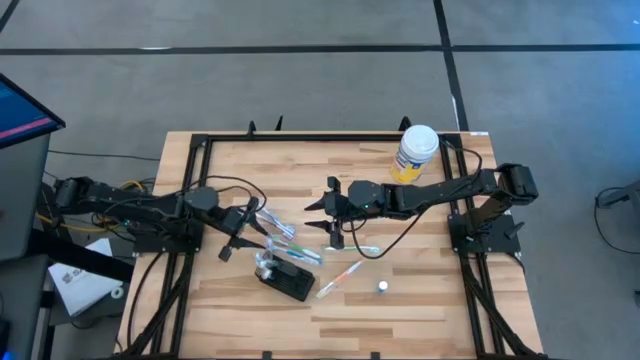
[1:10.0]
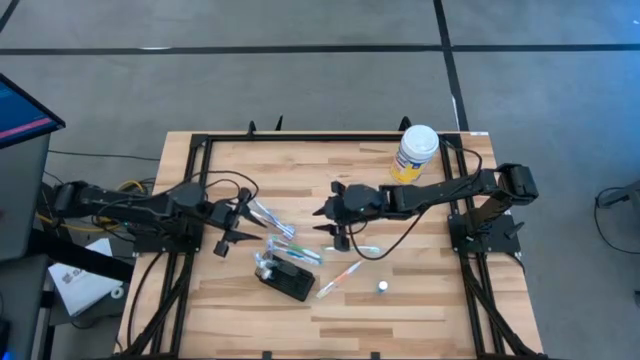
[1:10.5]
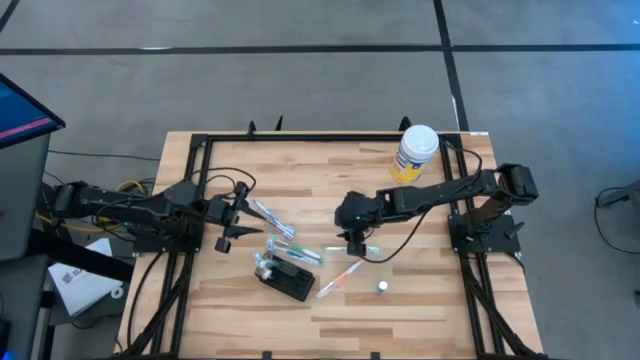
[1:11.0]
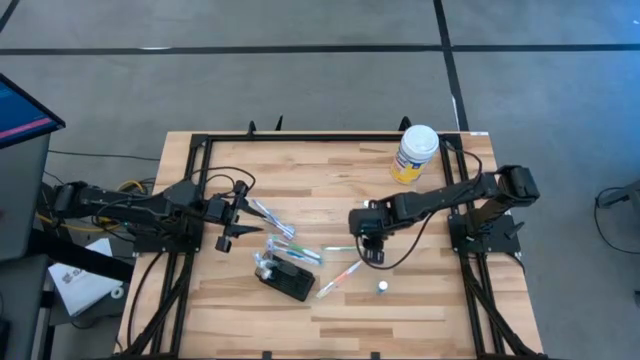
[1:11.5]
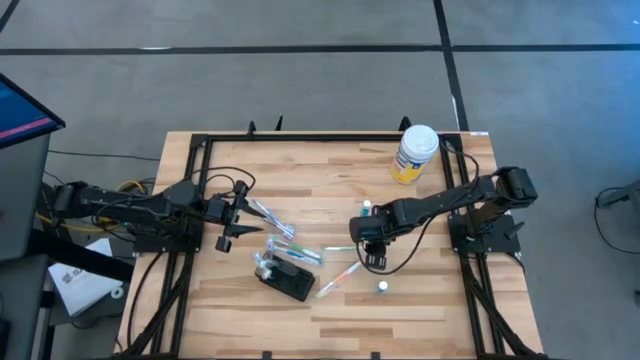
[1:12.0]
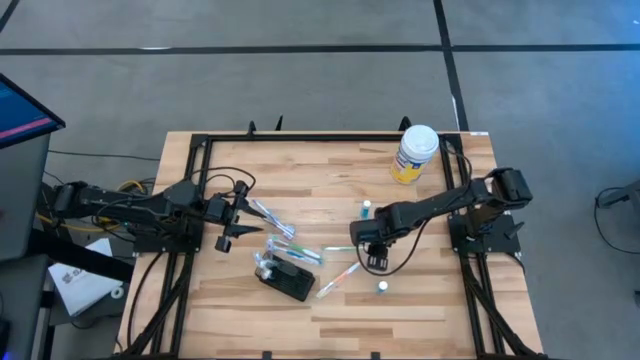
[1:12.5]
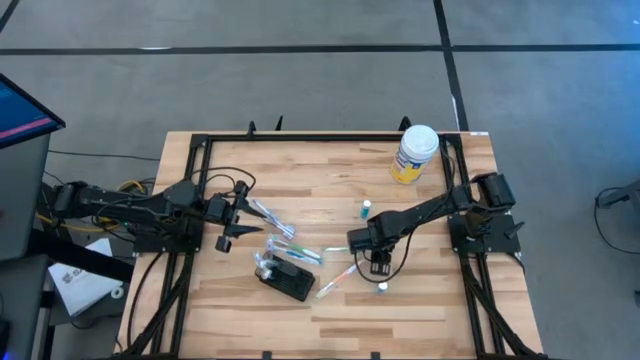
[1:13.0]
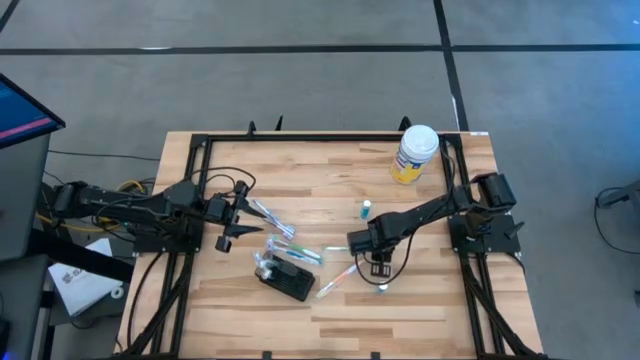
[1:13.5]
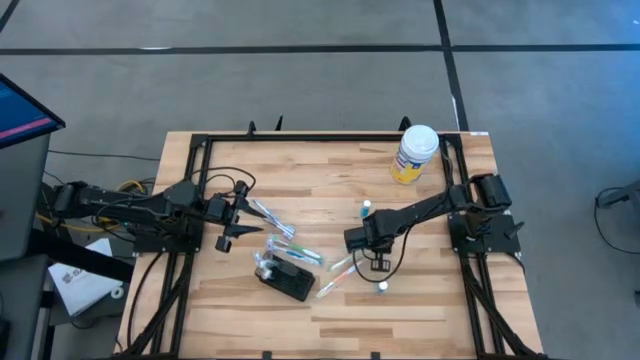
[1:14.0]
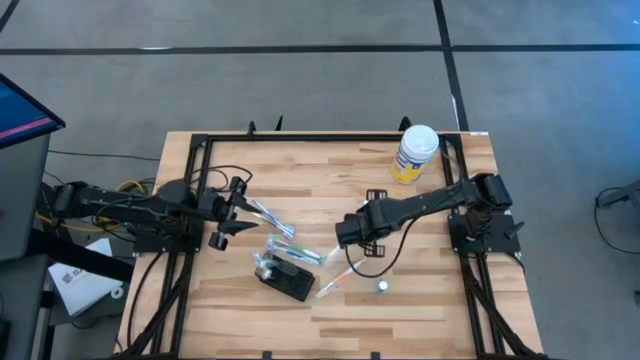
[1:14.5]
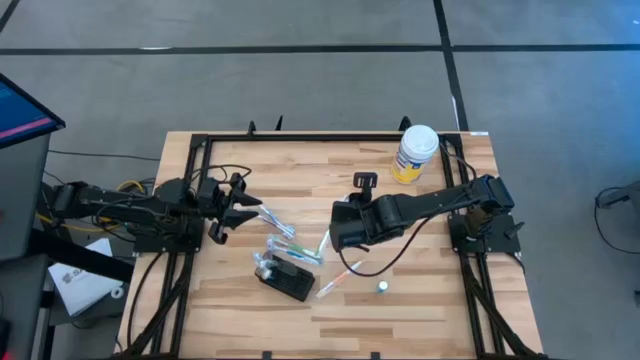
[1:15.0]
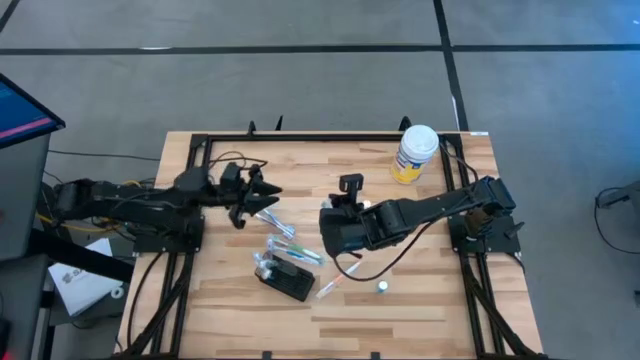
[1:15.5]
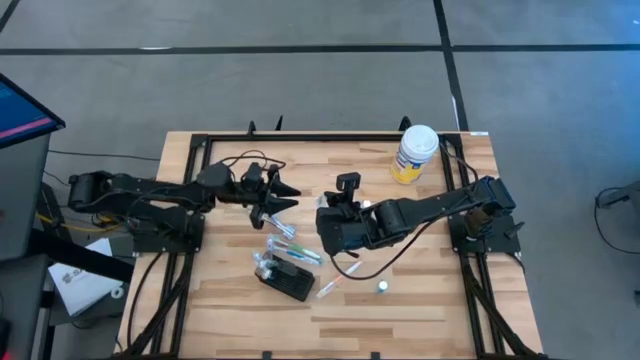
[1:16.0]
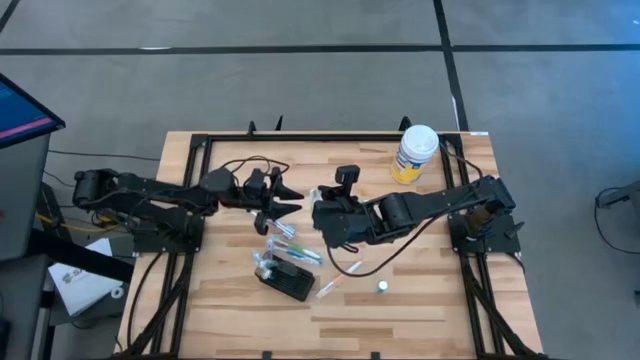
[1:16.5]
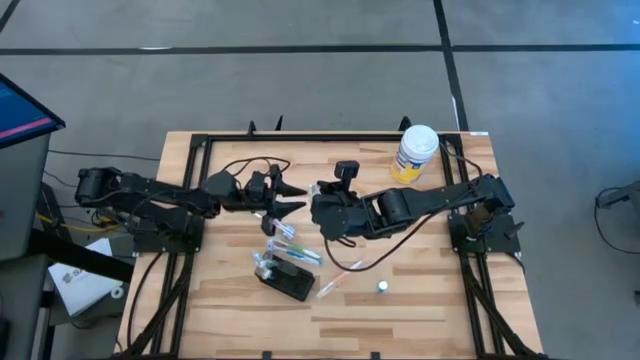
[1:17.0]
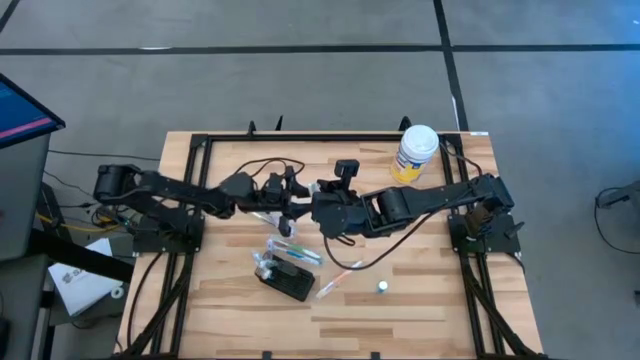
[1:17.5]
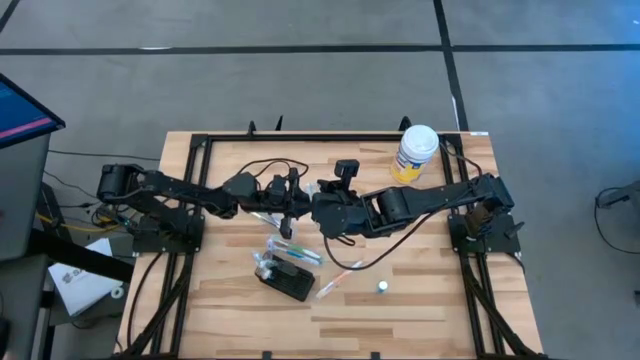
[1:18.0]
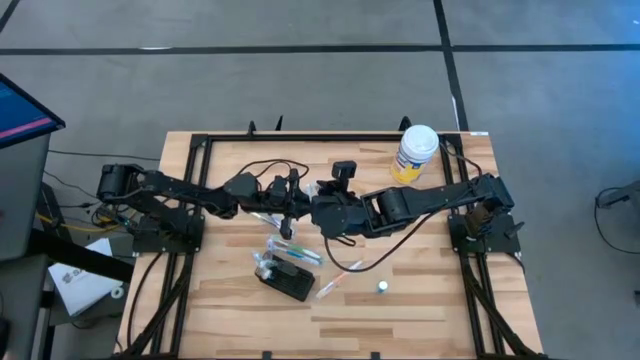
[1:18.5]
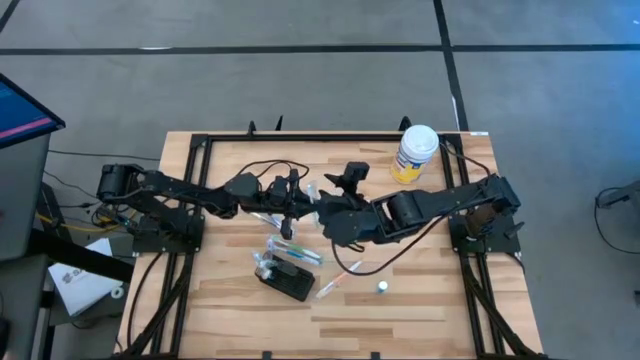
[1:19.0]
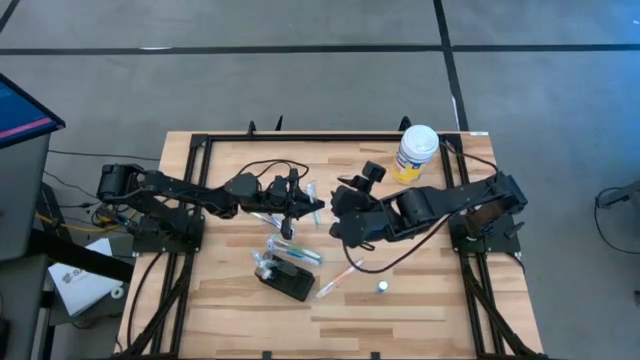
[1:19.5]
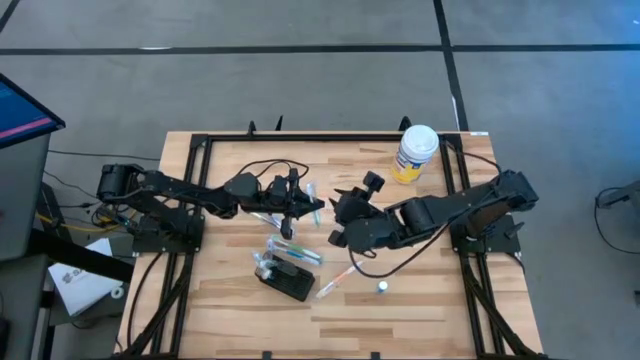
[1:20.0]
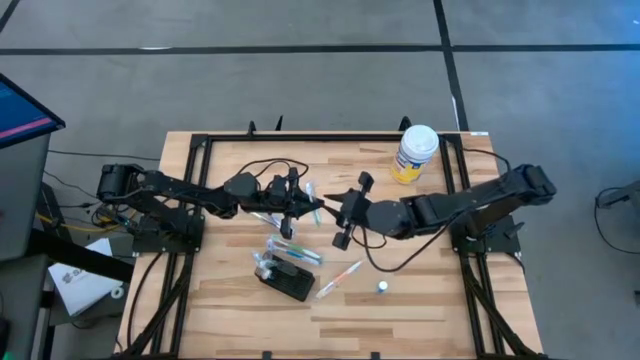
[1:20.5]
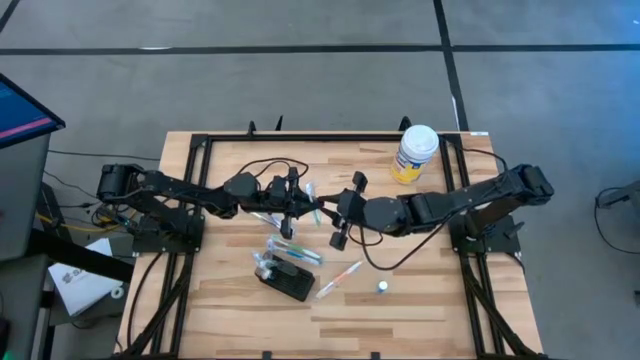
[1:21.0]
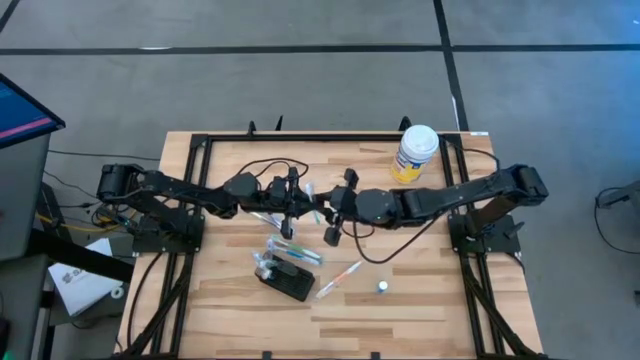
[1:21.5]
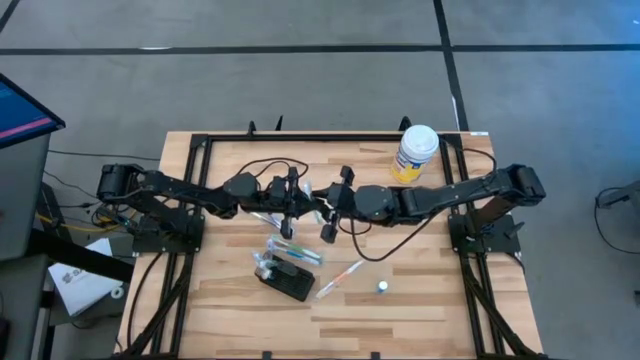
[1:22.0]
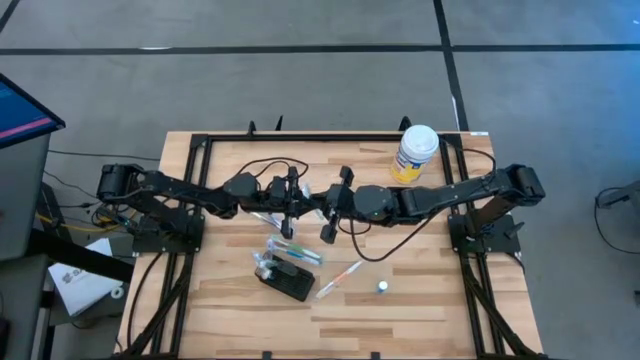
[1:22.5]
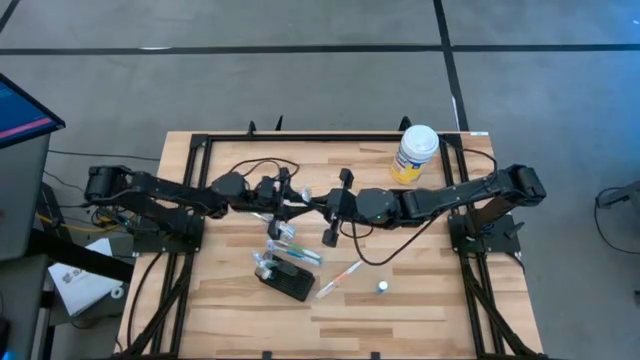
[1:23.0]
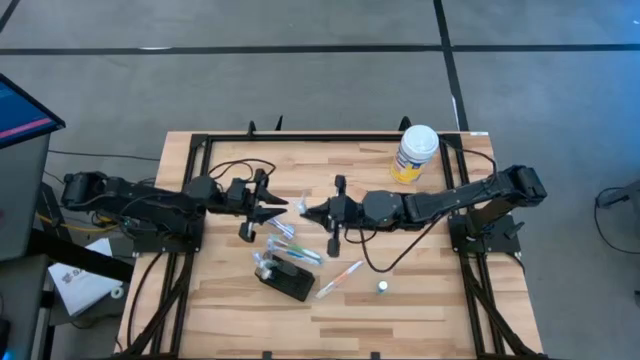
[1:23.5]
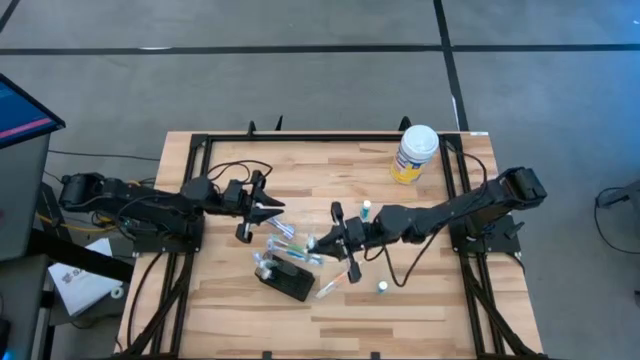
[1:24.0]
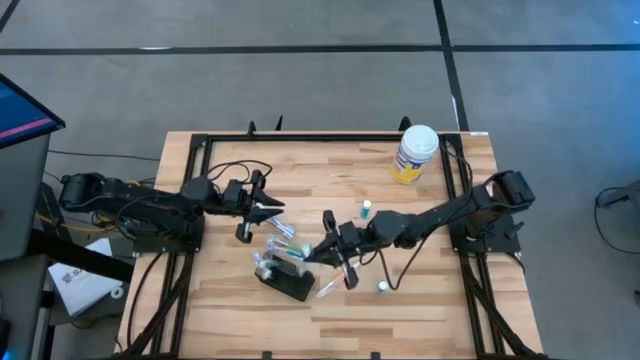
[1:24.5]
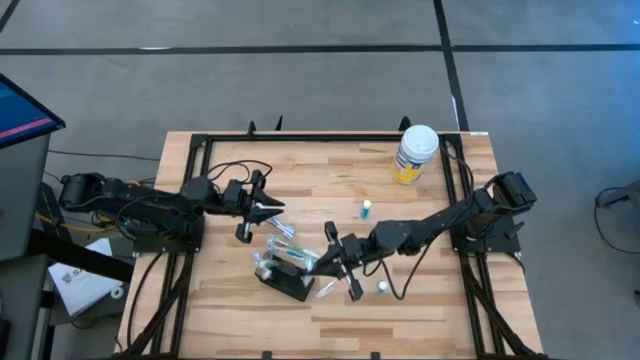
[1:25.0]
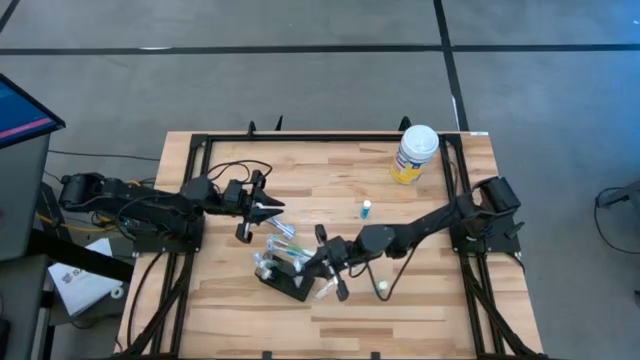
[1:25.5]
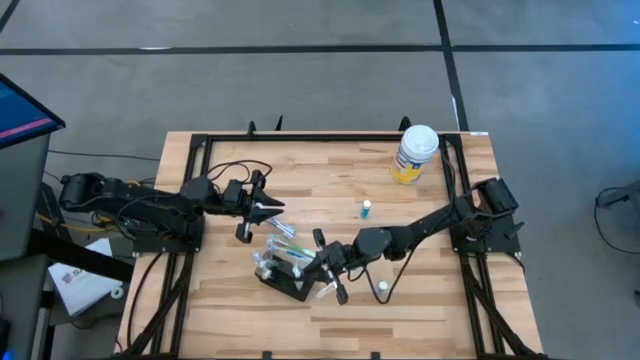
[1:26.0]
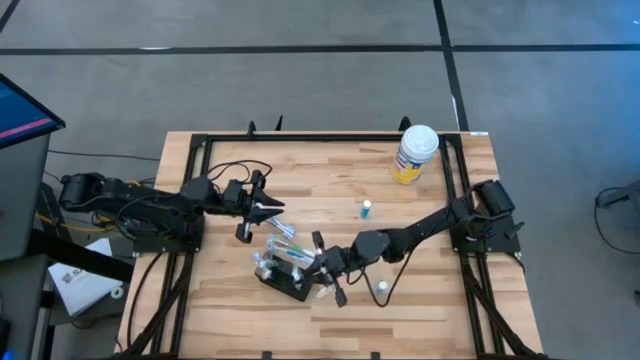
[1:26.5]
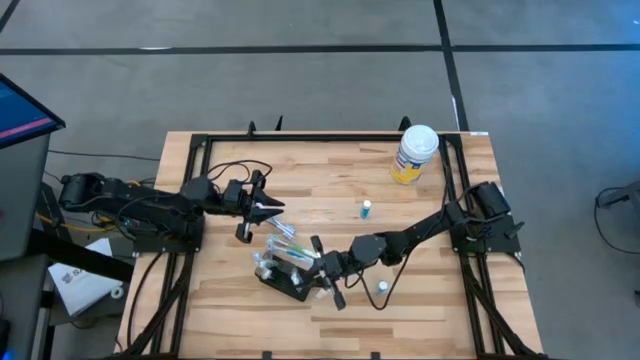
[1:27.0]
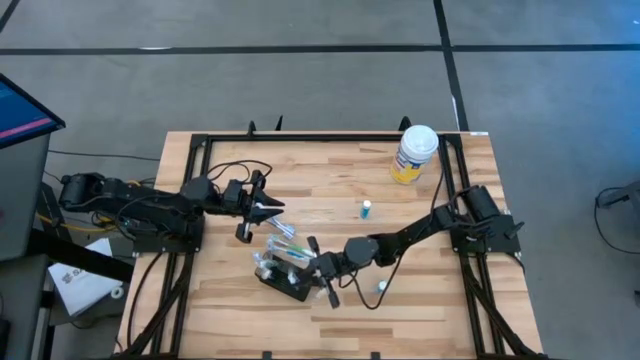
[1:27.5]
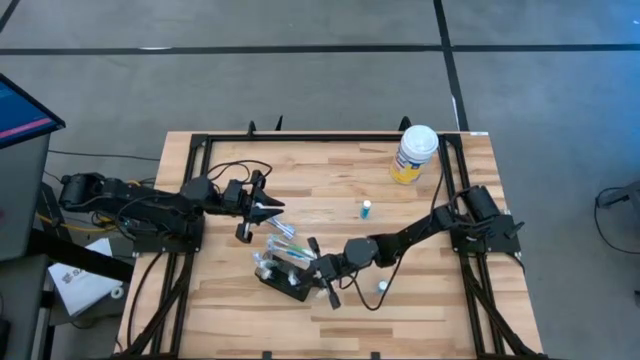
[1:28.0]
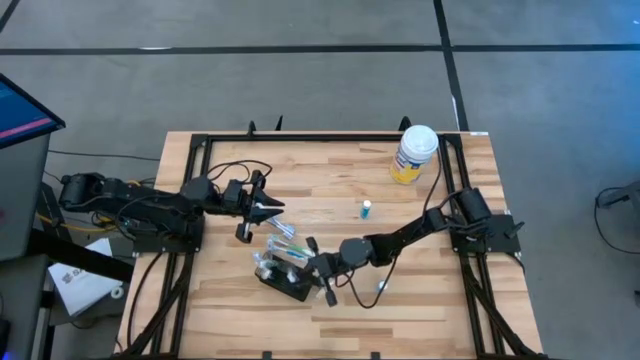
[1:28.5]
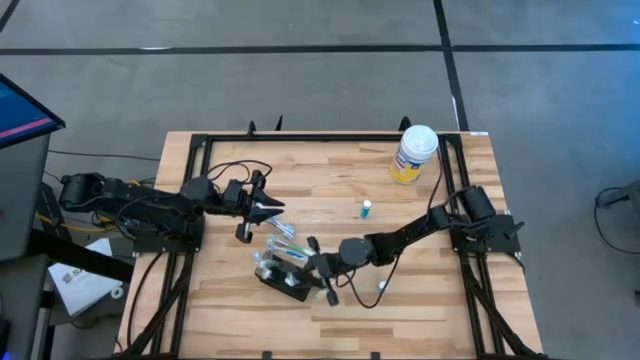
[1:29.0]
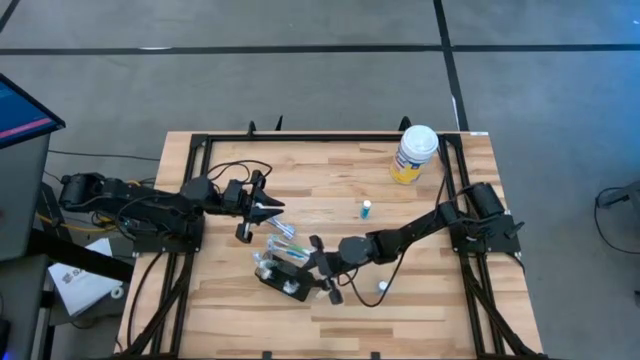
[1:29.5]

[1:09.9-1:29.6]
Task: Pick & Place toothbrushing station
Put the green toothbrush into the mesh organizer
